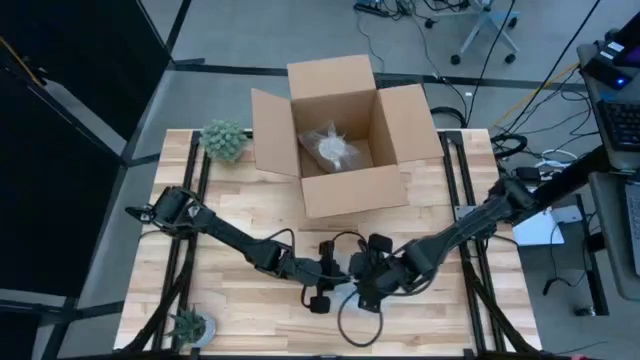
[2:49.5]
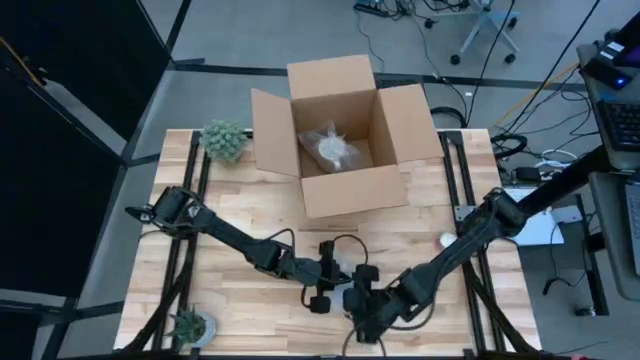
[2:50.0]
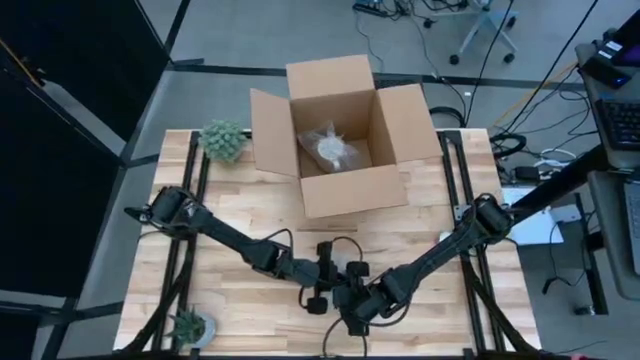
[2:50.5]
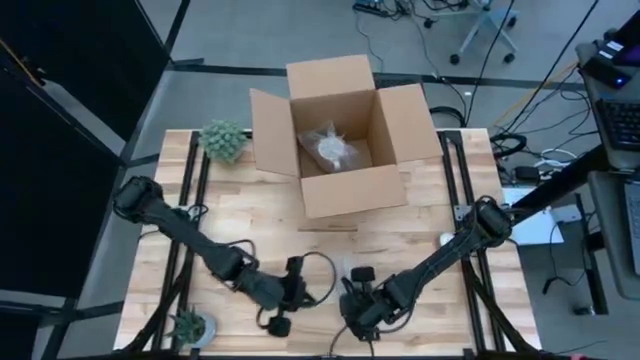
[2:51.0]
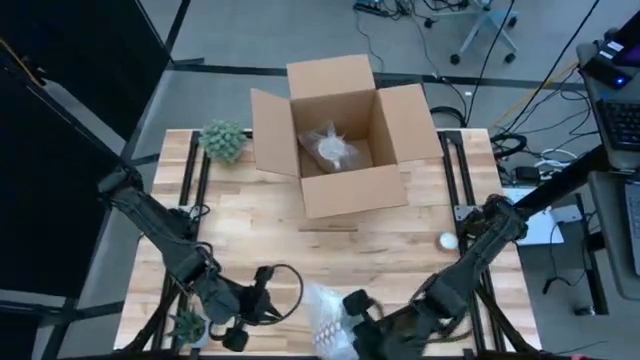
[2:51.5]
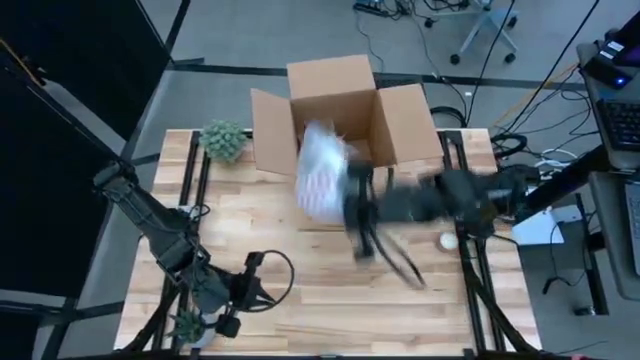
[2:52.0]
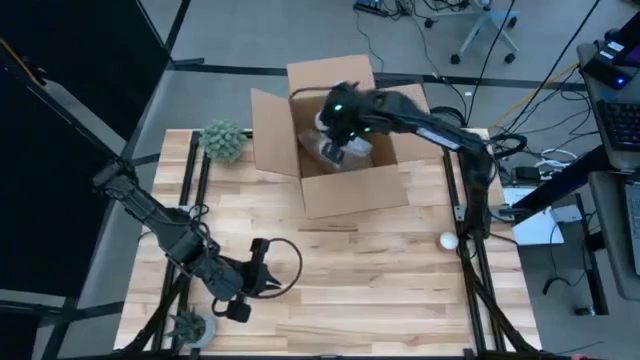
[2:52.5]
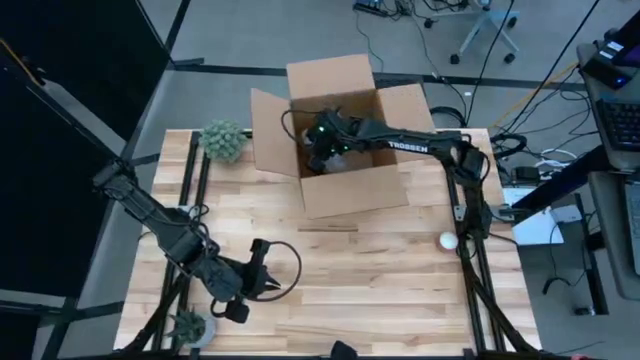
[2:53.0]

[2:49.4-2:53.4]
Task: wrap mug
Put the red mug into the cardboard box

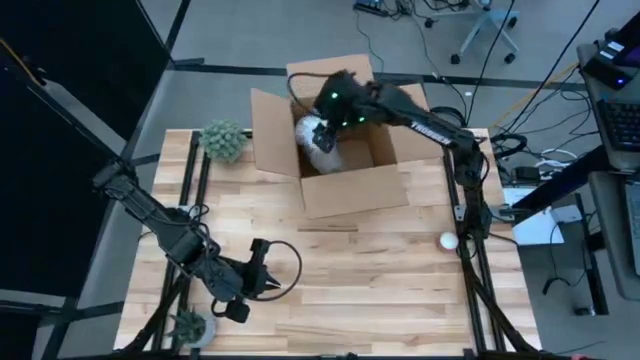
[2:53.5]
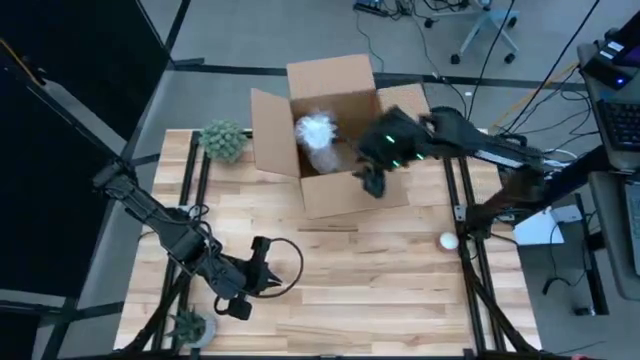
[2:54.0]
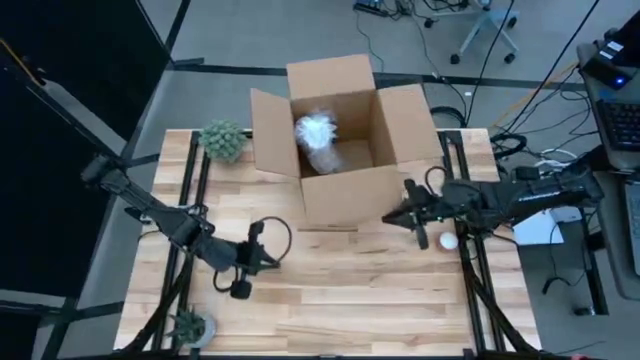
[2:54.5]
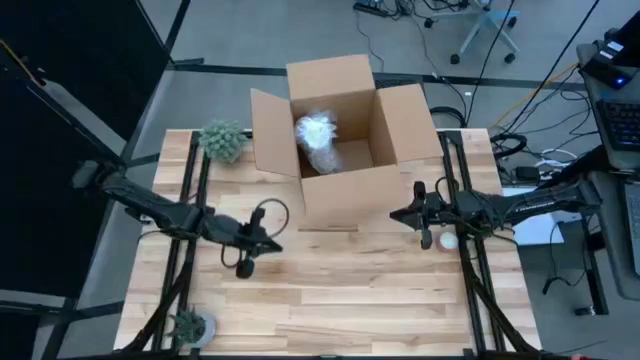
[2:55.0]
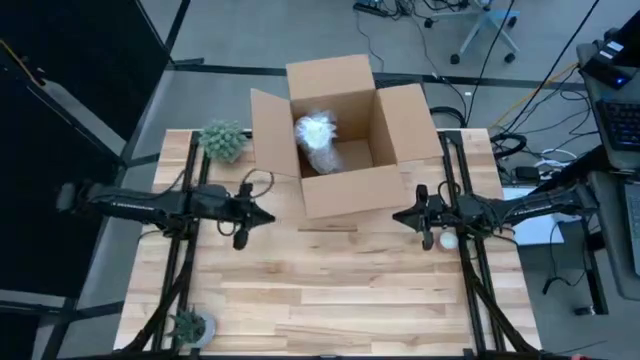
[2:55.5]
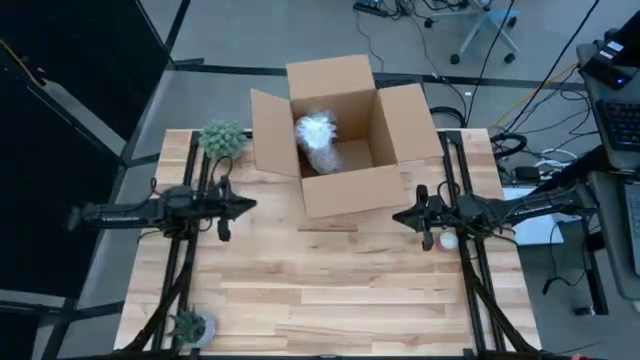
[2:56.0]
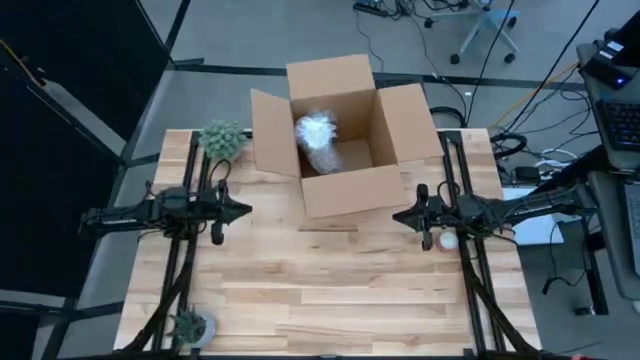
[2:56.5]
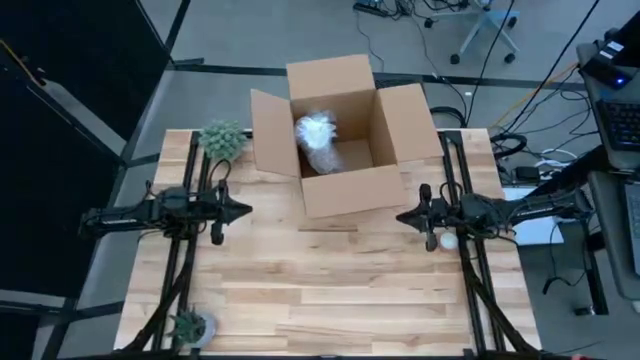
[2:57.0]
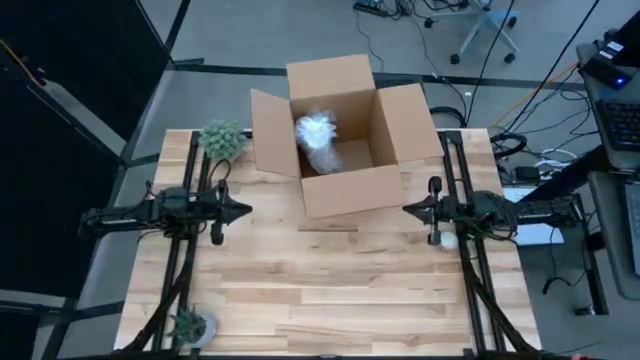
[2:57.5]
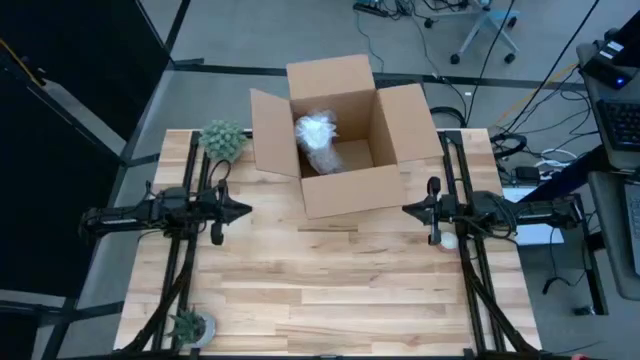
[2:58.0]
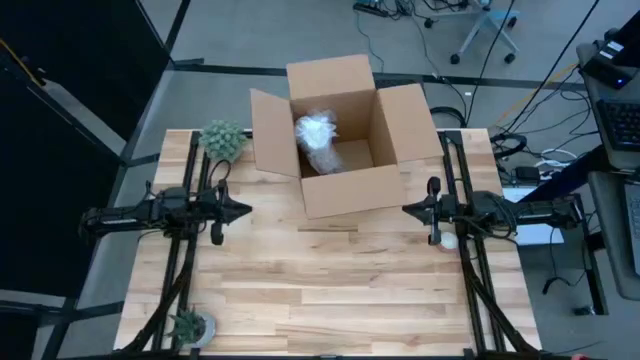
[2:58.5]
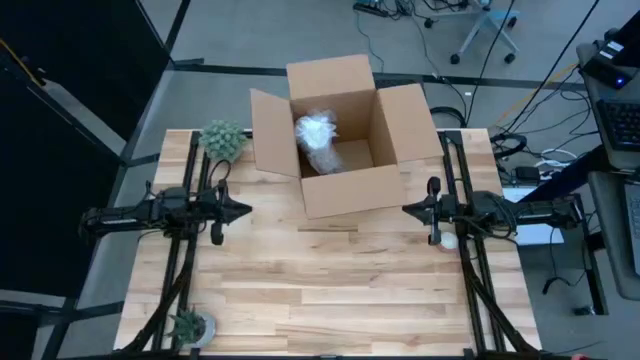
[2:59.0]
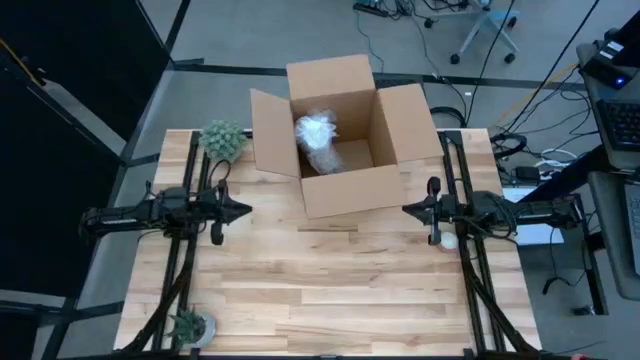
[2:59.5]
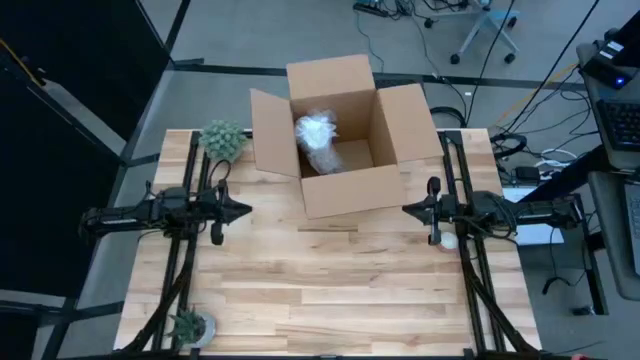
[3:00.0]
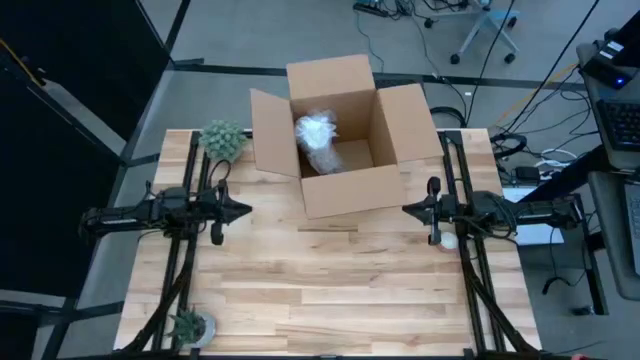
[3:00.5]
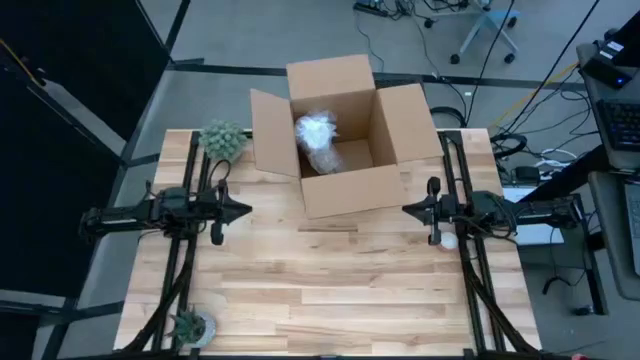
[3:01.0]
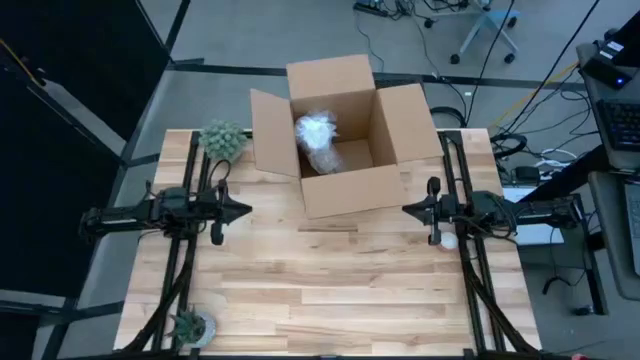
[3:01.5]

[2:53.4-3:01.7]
Return to Home Position

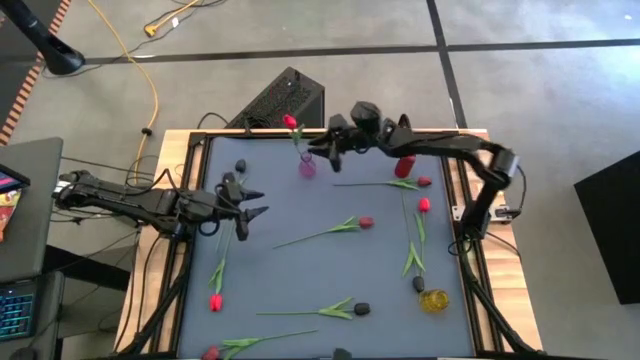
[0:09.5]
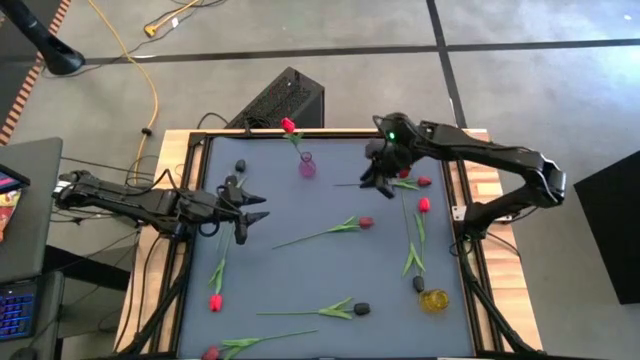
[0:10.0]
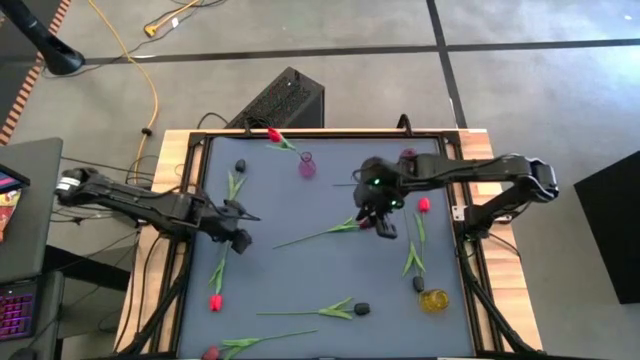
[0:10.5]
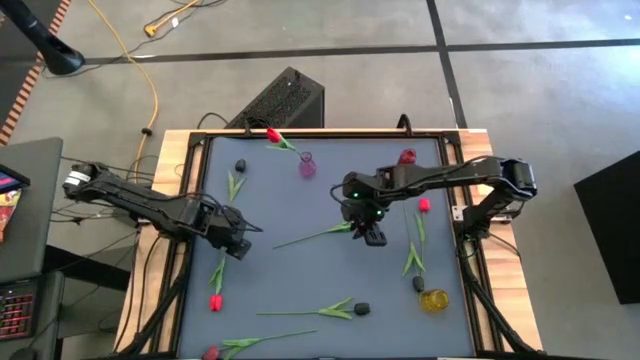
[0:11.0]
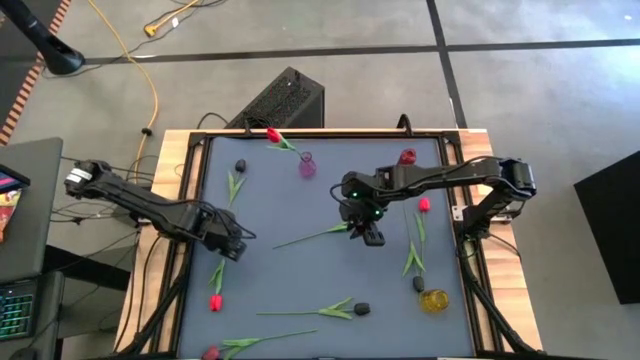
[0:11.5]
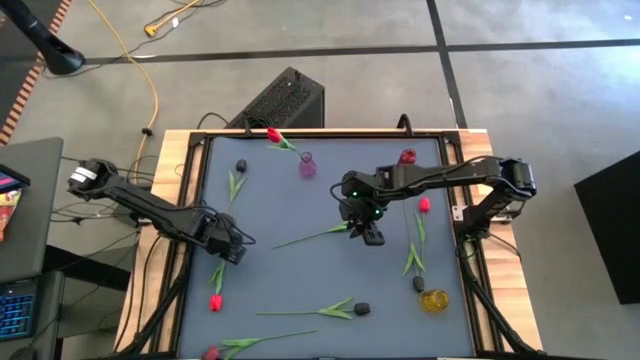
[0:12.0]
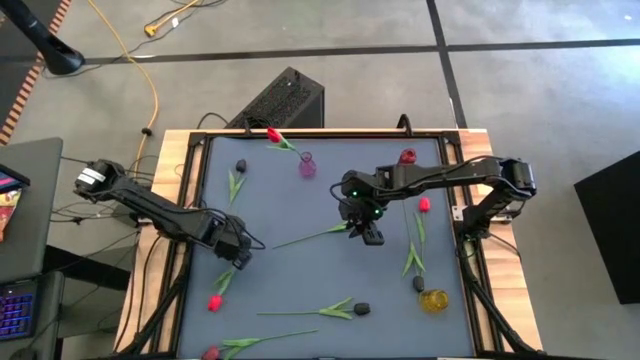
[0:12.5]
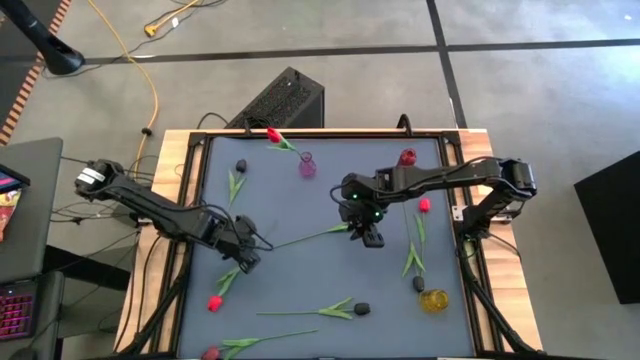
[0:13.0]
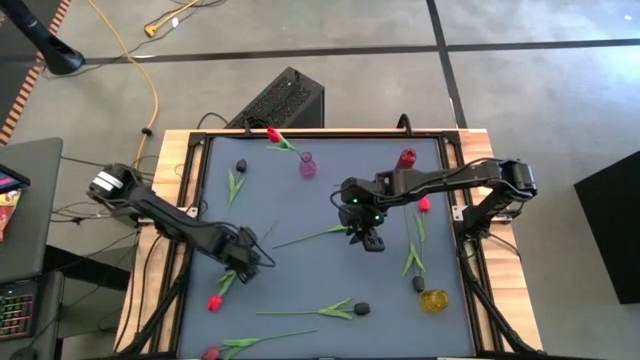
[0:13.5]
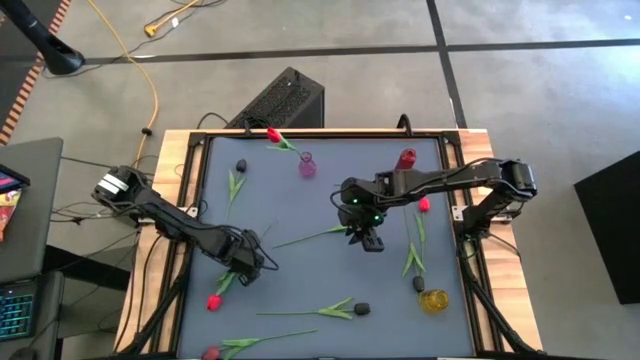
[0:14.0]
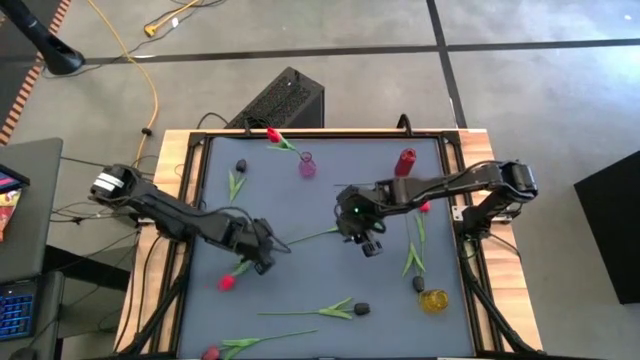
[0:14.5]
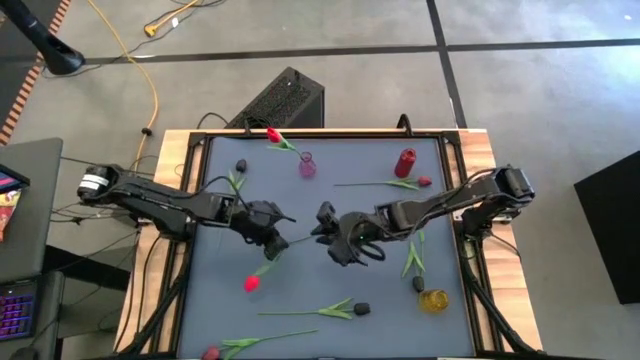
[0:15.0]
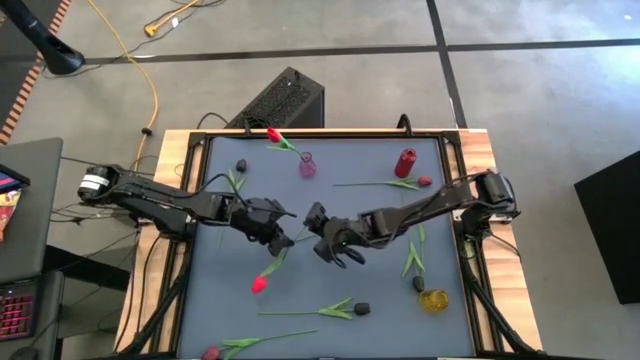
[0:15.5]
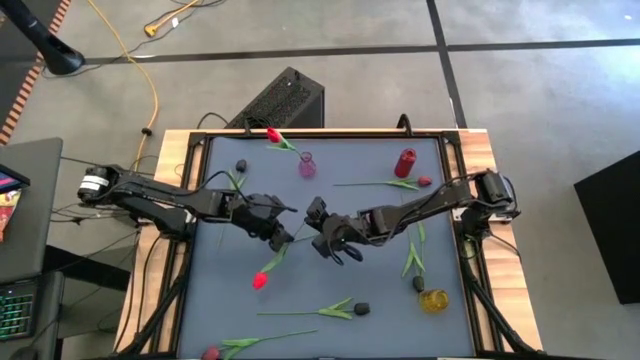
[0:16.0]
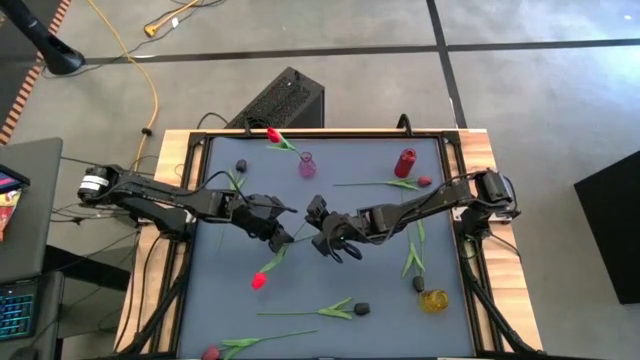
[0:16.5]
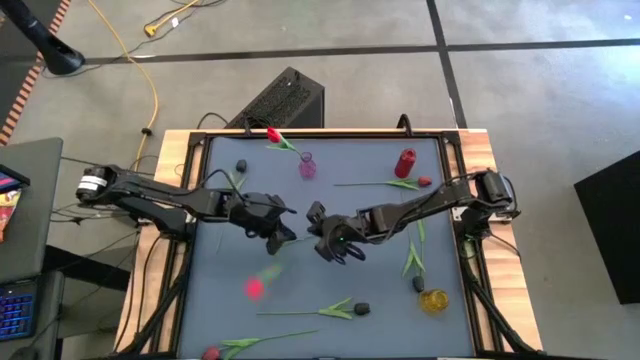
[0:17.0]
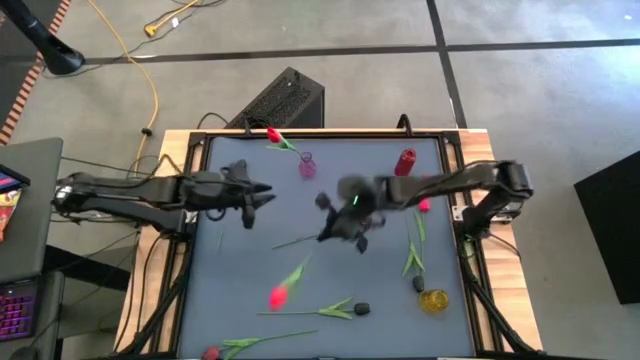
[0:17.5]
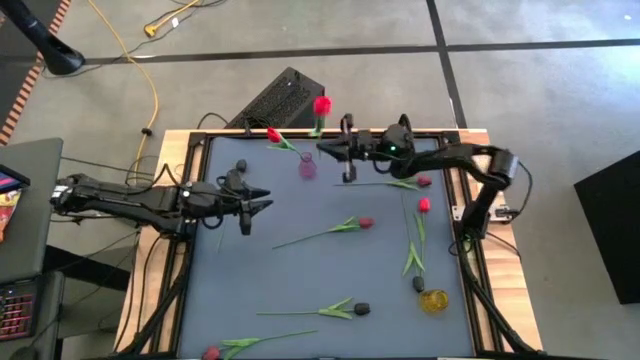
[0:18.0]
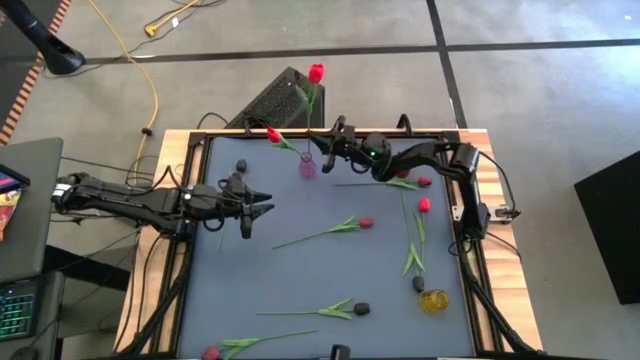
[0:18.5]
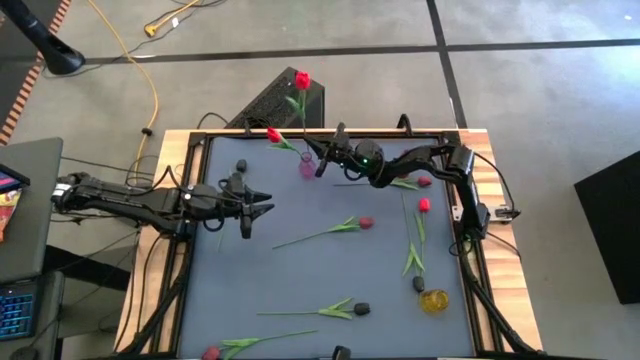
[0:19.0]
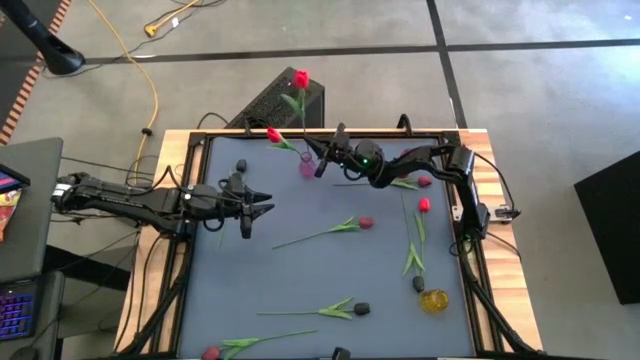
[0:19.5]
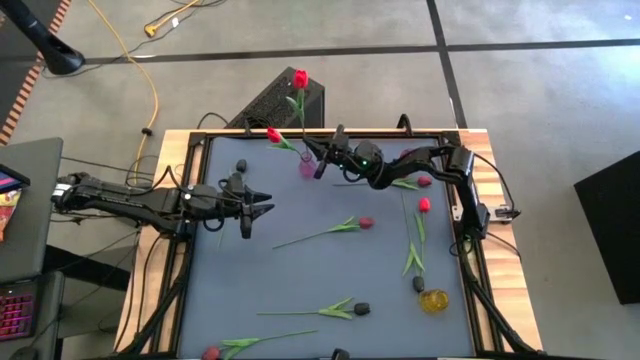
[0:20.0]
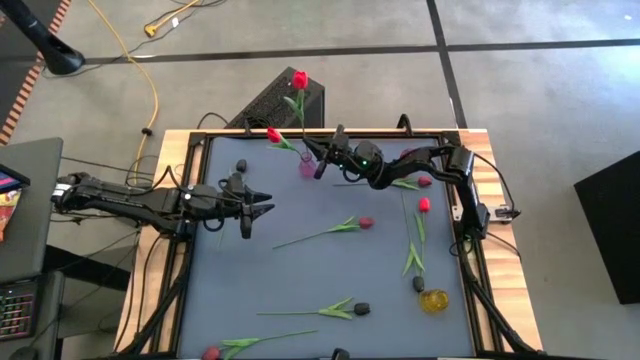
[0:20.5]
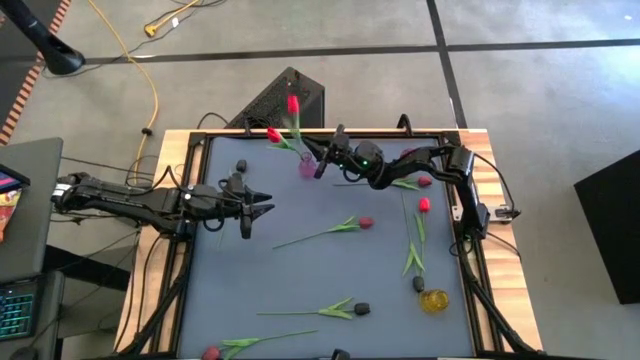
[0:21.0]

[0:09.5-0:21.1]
Task: Sort flowers into vase by color
Put the left pink flower into the purple vase
